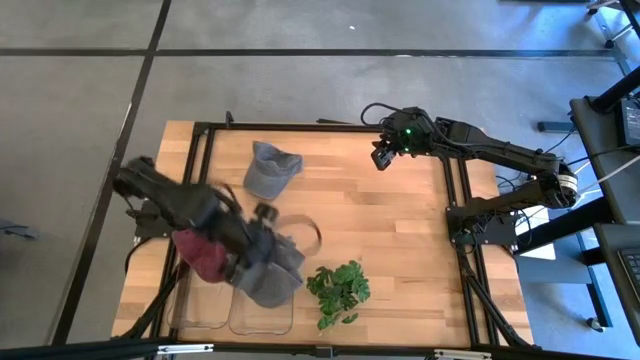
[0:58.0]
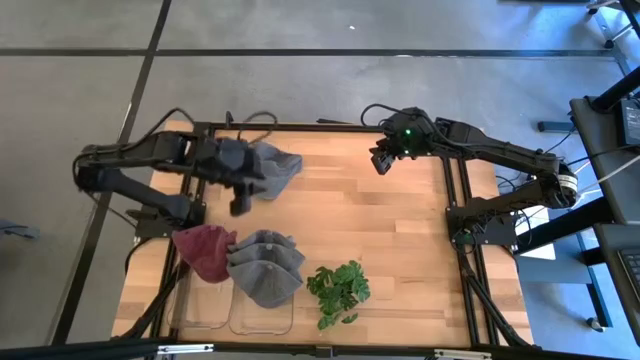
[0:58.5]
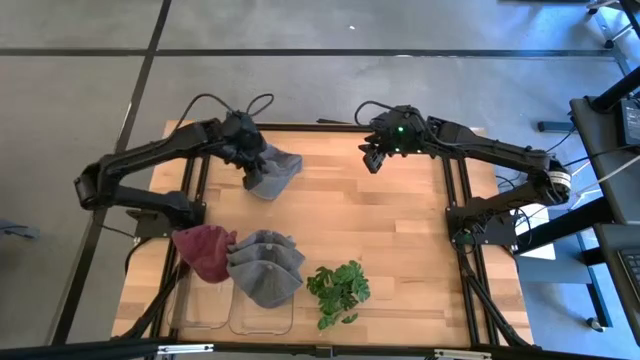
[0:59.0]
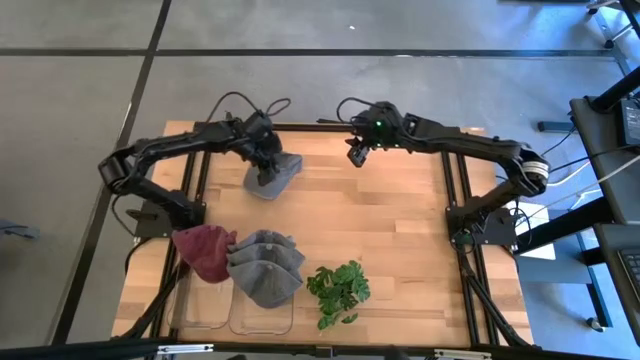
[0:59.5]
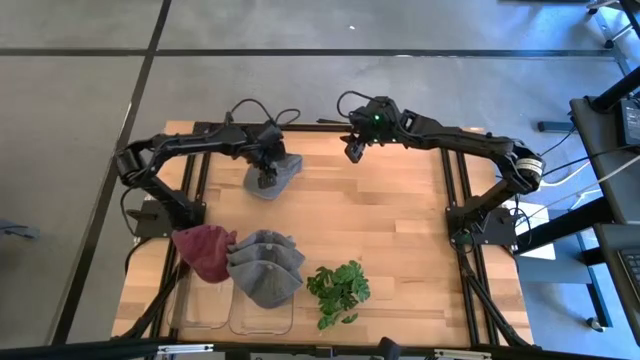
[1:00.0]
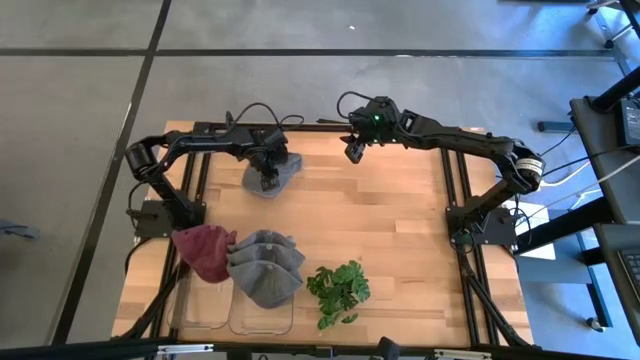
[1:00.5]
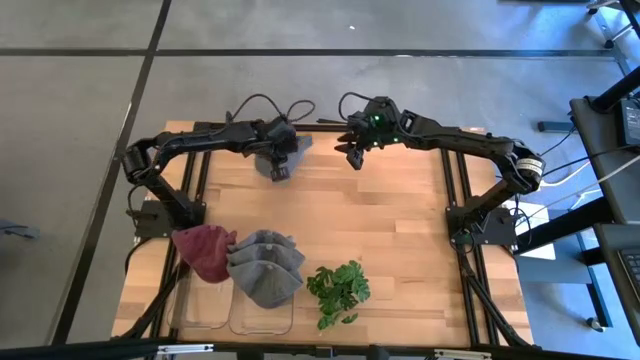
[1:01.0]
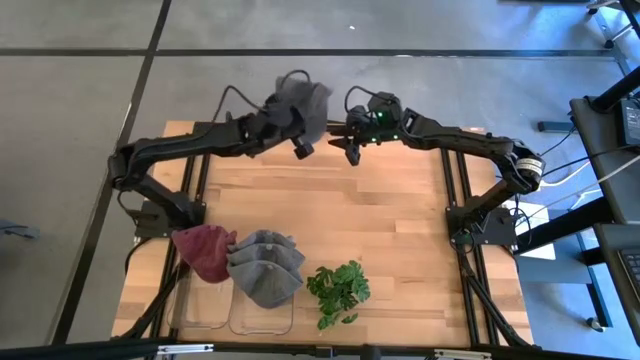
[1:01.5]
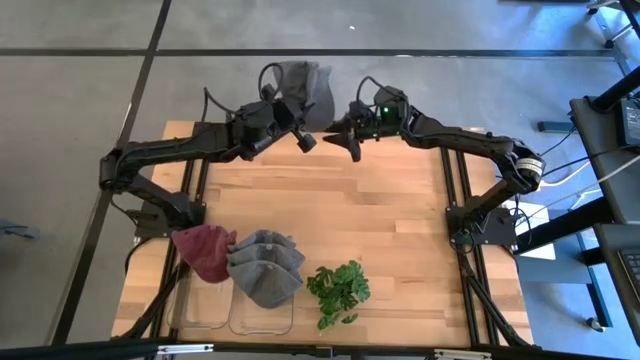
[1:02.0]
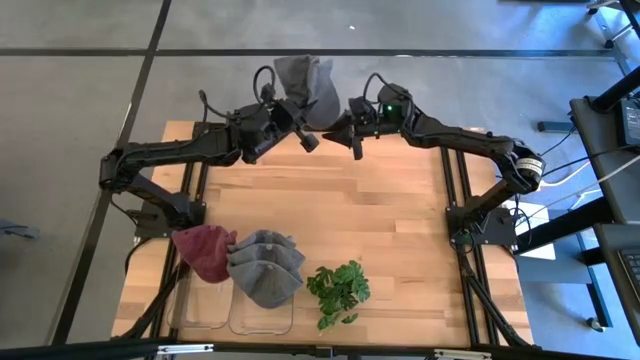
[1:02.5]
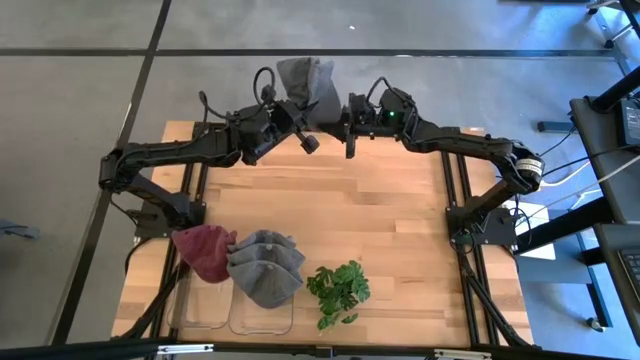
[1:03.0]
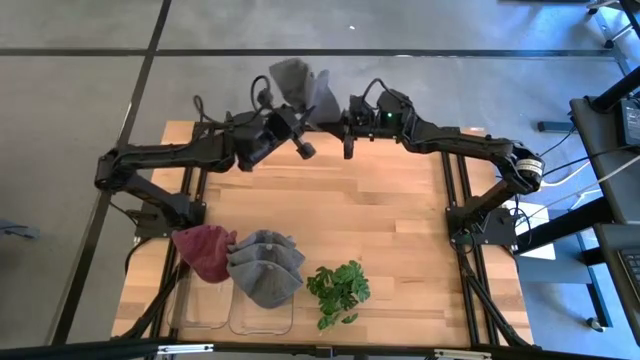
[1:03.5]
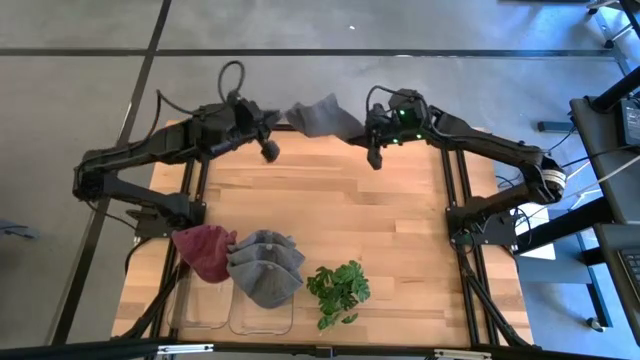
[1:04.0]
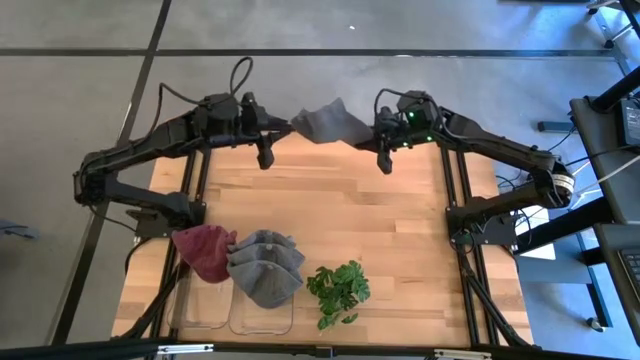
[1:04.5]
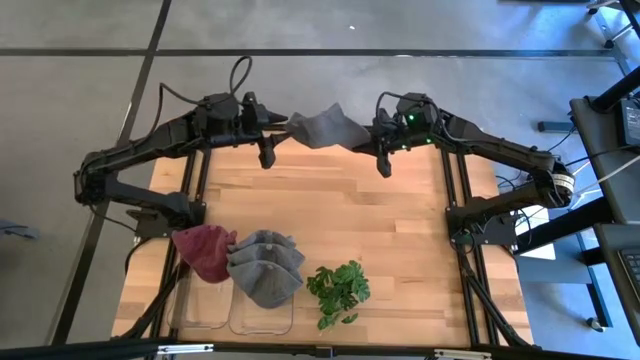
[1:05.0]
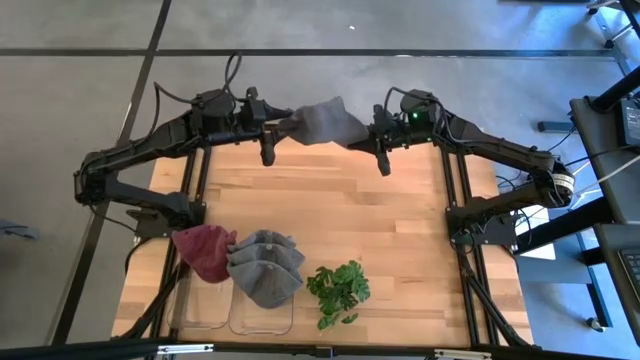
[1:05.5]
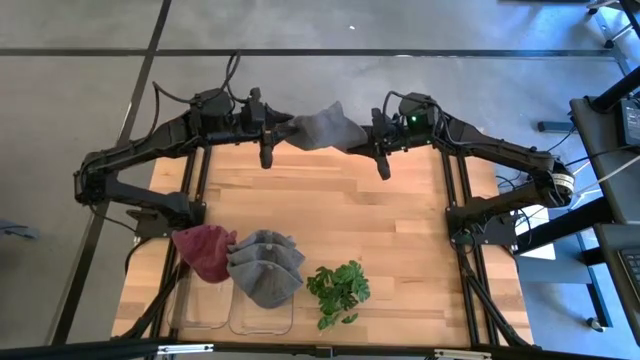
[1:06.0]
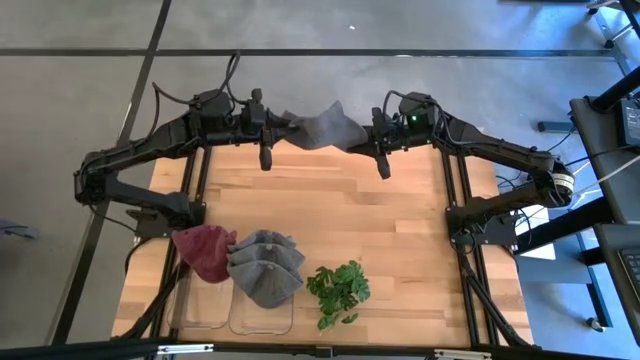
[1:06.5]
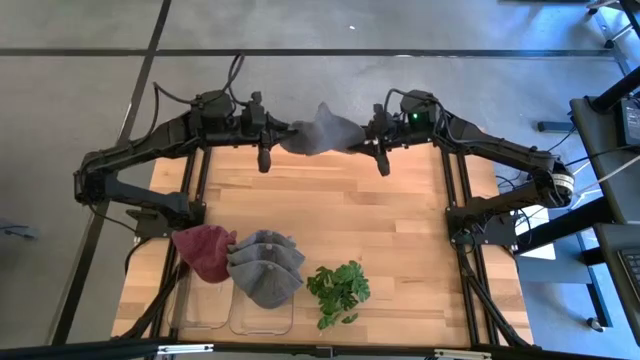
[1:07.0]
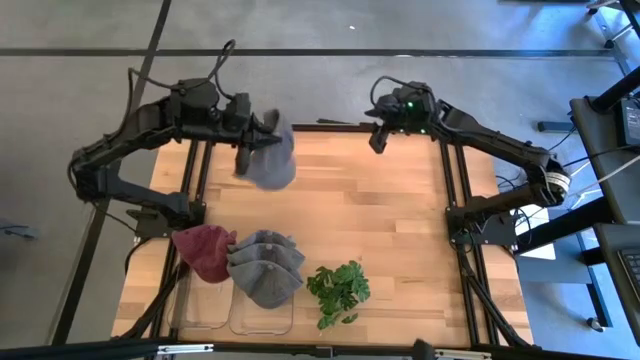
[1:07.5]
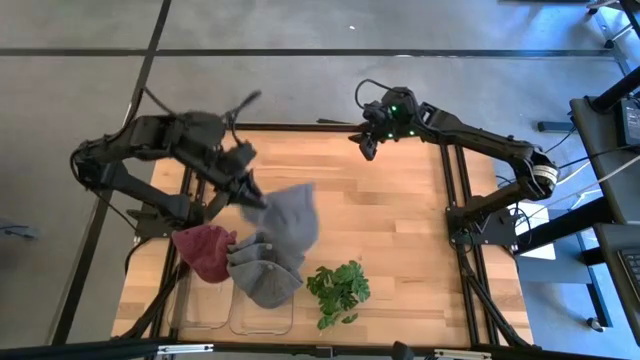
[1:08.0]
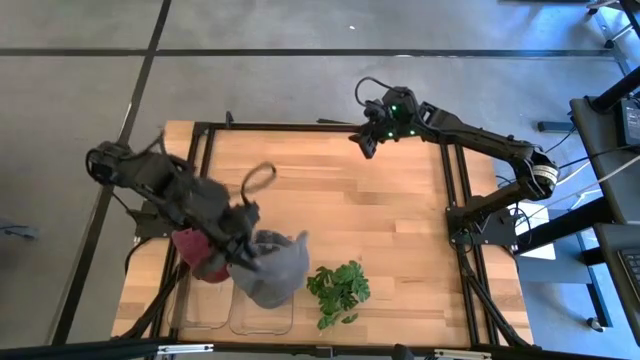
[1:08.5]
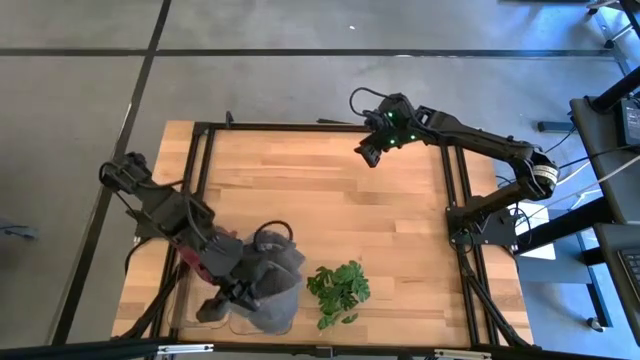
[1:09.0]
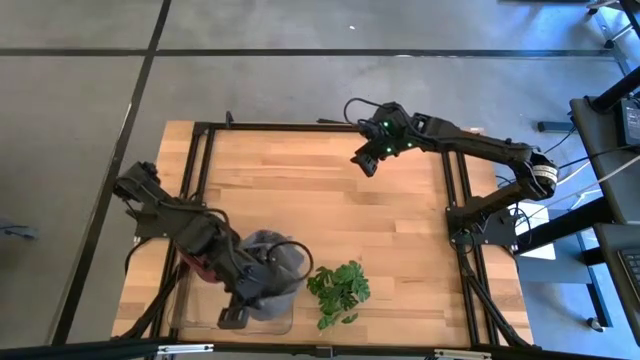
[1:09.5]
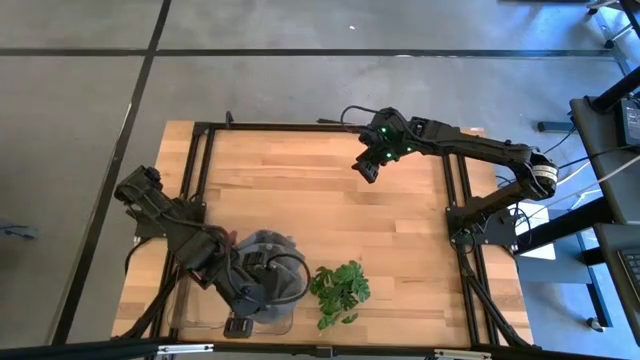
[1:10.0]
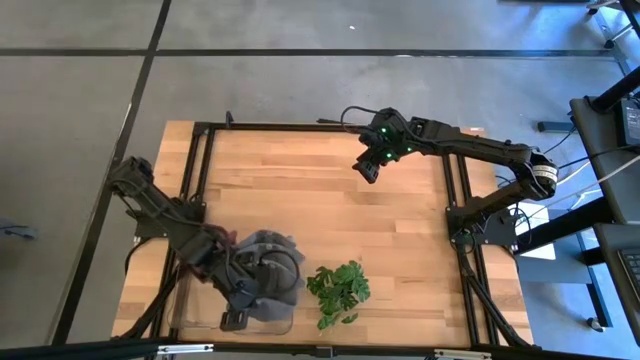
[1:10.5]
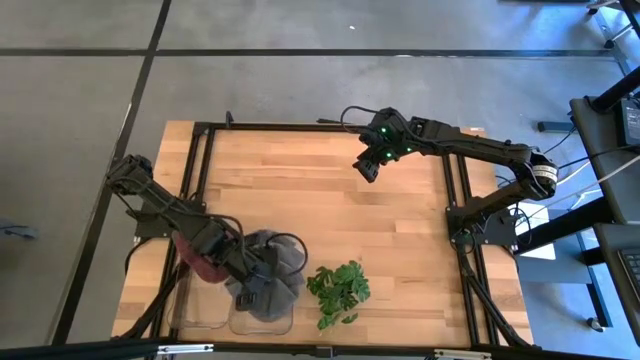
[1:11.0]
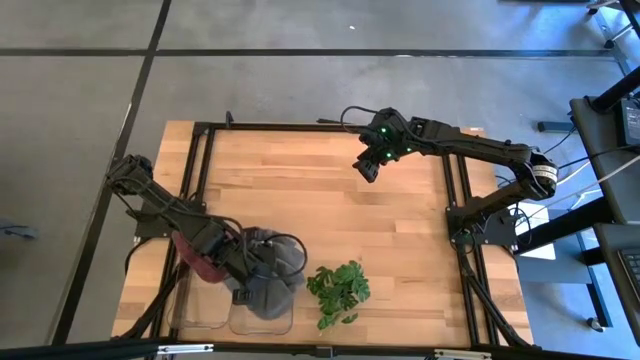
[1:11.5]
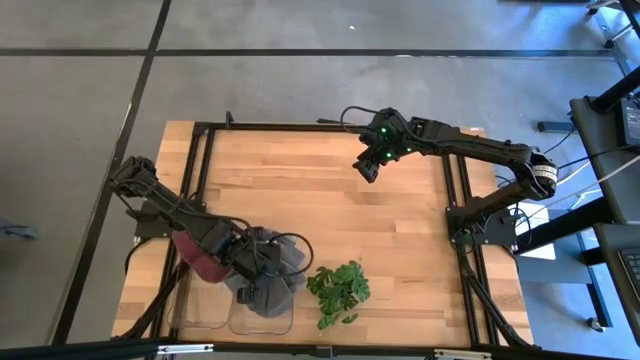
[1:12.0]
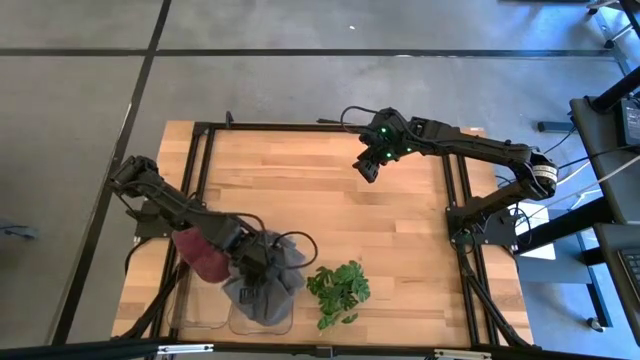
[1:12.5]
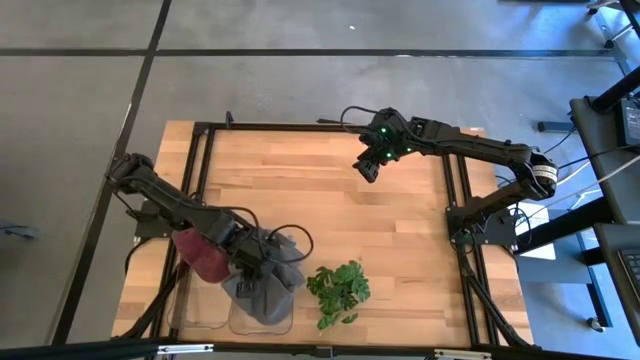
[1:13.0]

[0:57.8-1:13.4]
Task: Pick & Place hat
Put the gray cap into the right transparent bin

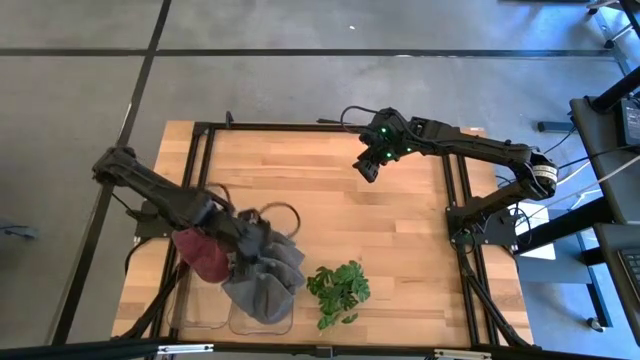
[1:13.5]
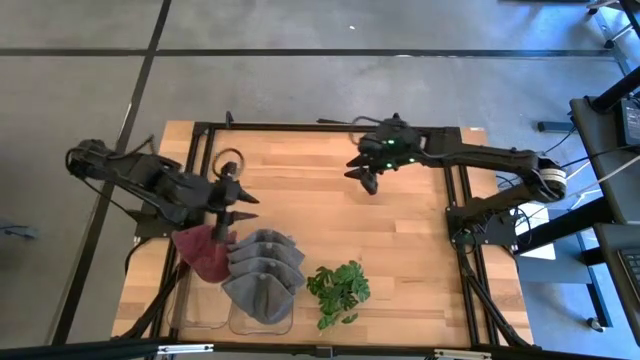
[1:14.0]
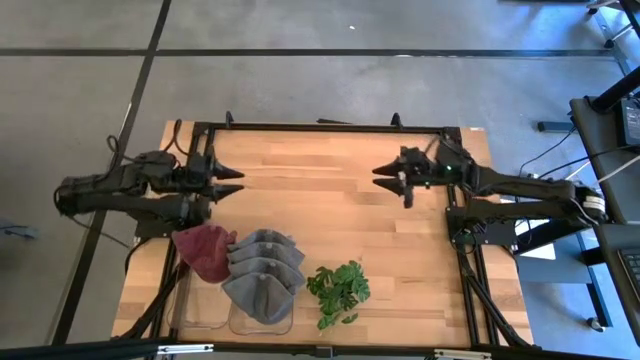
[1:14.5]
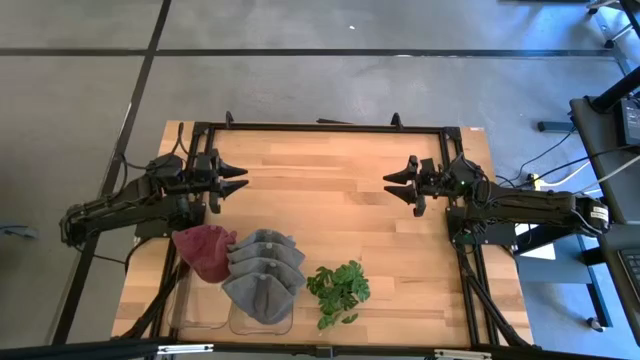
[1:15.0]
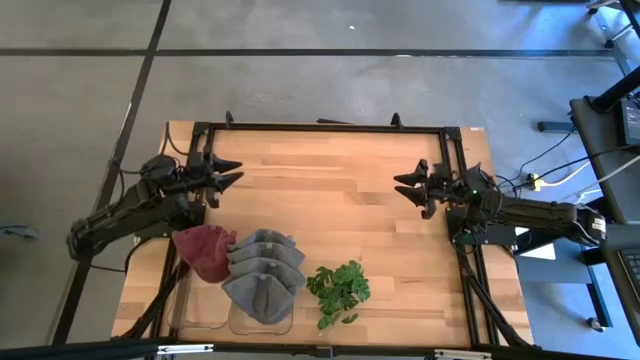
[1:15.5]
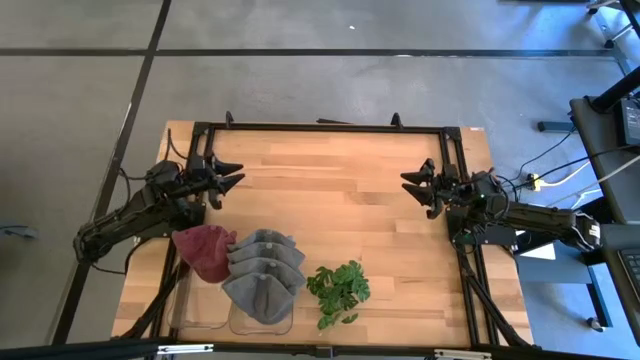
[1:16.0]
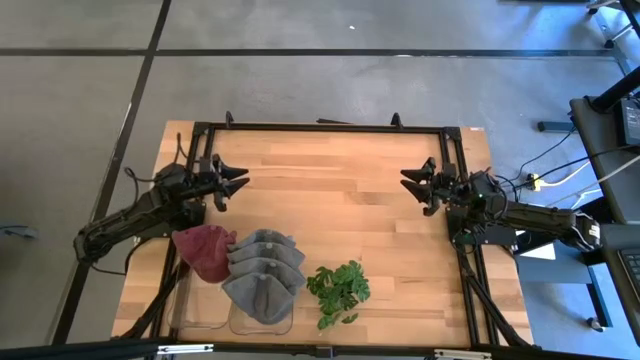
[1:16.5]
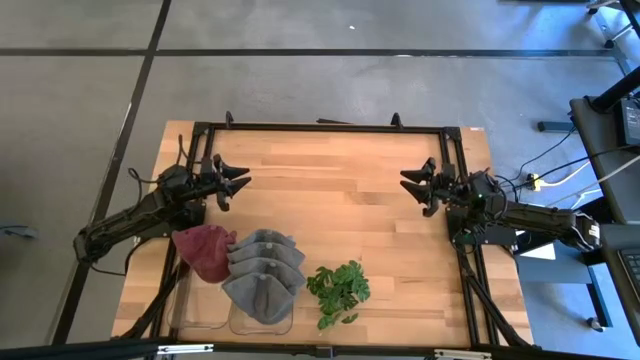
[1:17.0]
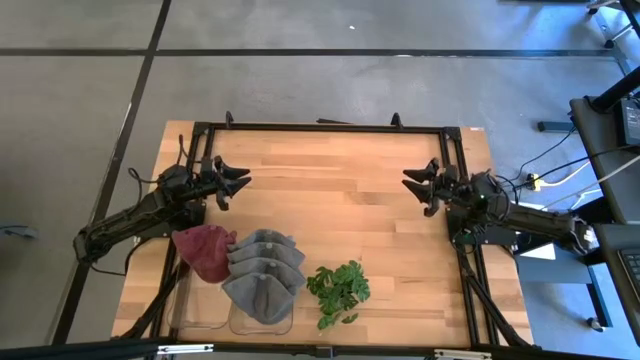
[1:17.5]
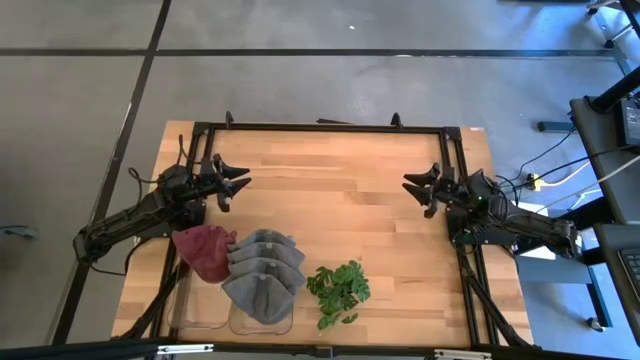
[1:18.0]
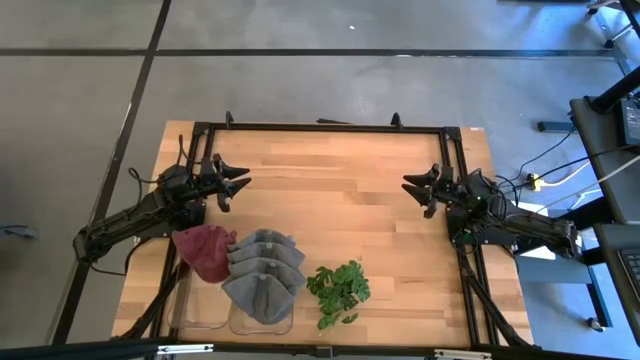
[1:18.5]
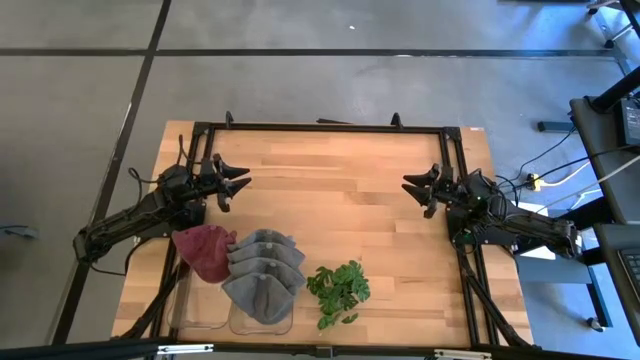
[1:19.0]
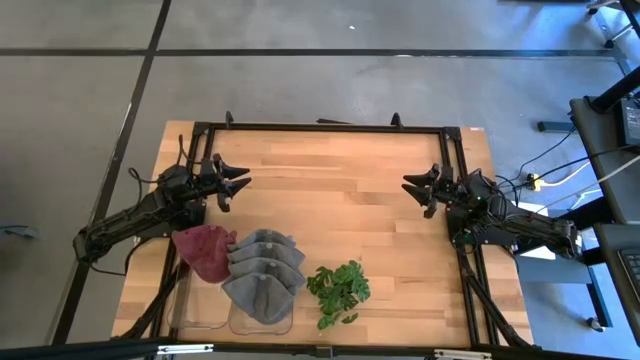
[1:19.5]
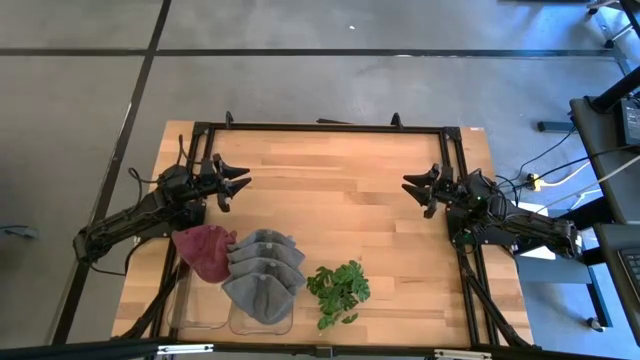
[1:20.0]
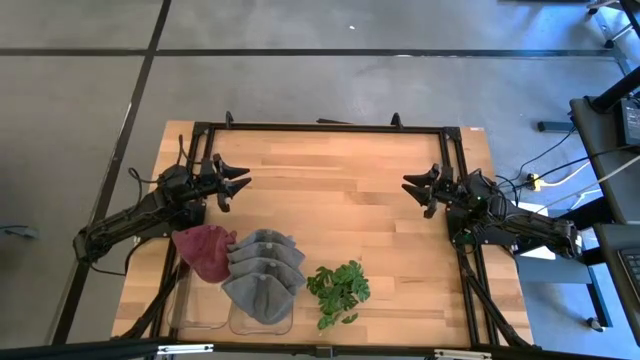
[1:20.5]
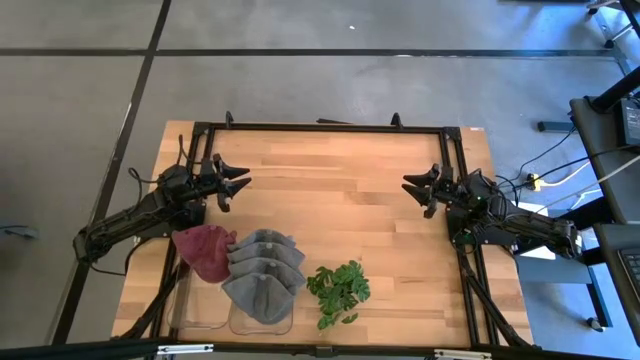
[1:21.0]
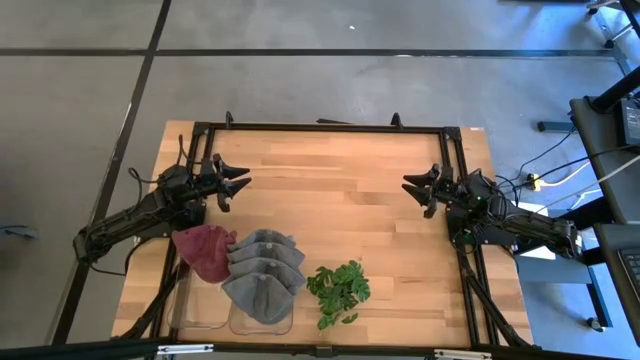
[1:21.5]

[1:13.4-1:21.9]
Return to Home Position
